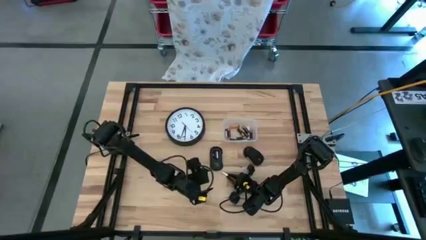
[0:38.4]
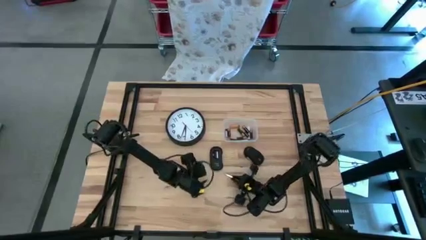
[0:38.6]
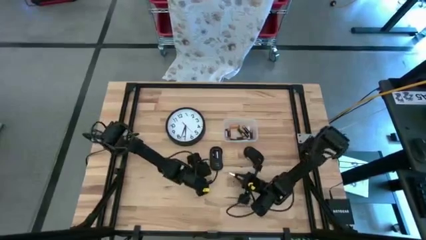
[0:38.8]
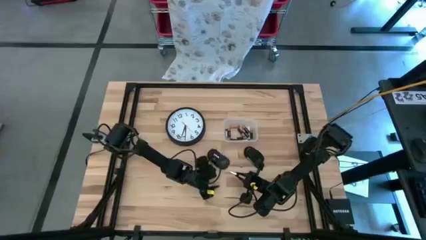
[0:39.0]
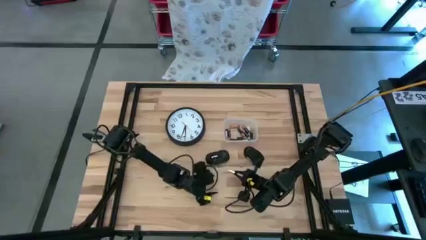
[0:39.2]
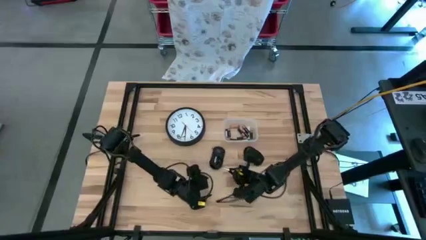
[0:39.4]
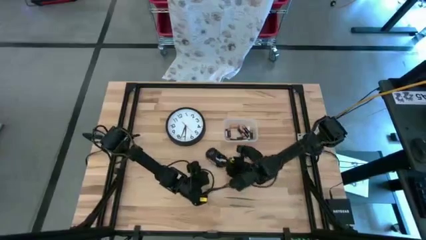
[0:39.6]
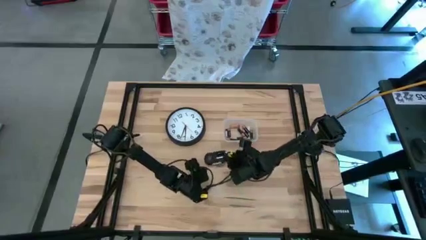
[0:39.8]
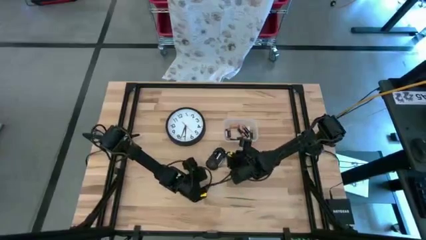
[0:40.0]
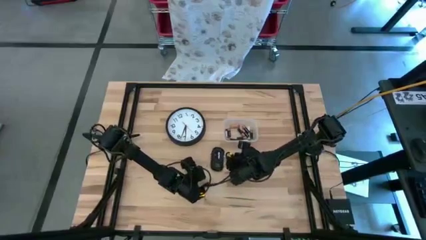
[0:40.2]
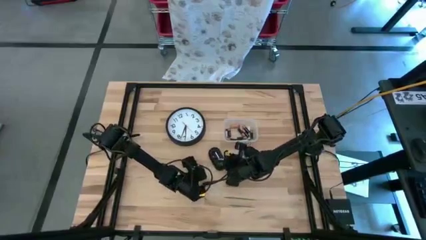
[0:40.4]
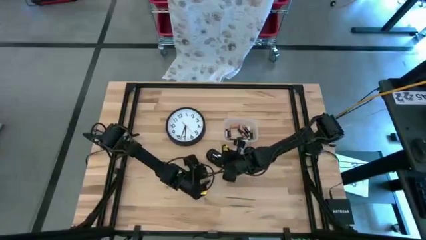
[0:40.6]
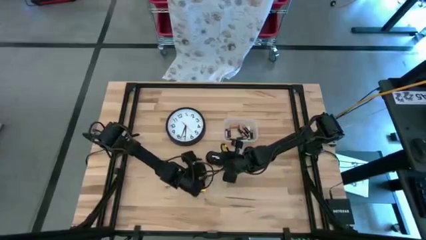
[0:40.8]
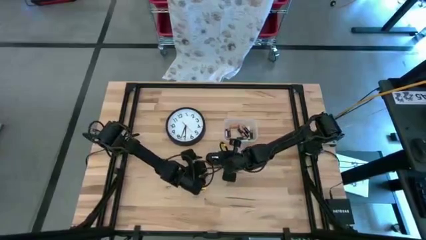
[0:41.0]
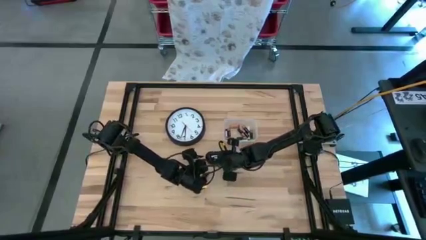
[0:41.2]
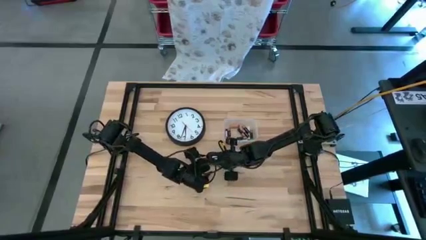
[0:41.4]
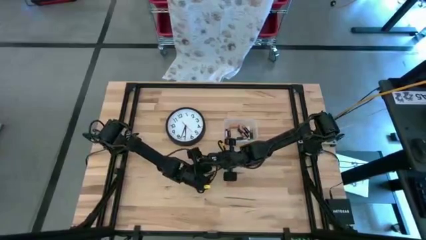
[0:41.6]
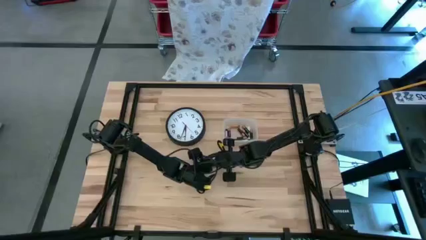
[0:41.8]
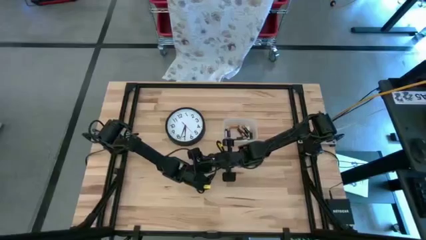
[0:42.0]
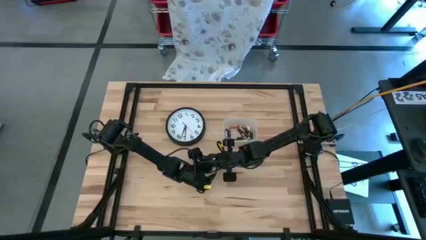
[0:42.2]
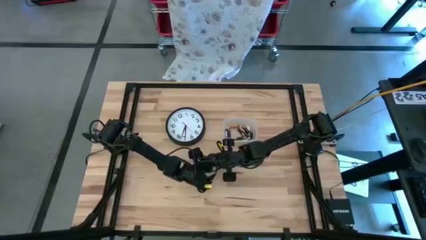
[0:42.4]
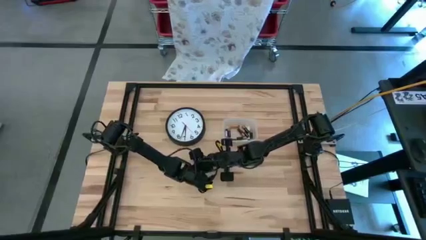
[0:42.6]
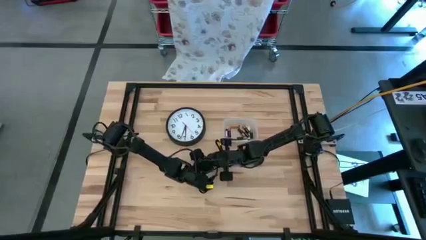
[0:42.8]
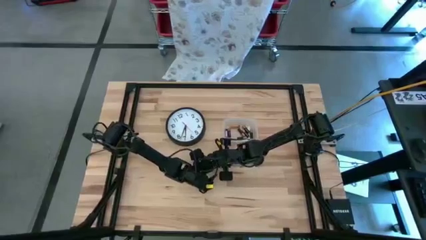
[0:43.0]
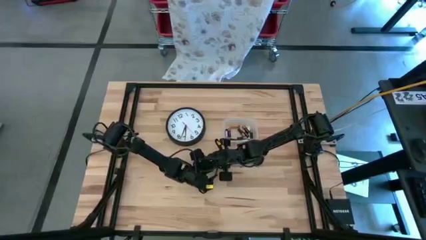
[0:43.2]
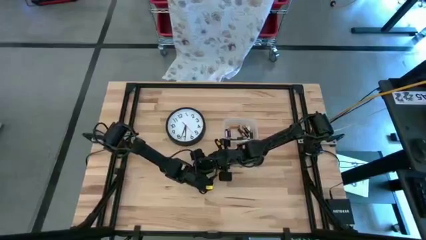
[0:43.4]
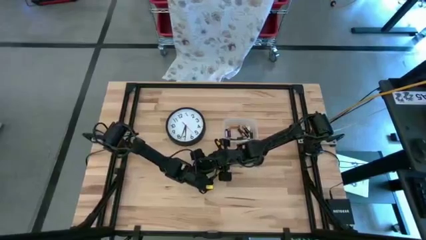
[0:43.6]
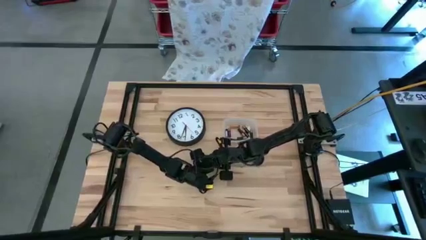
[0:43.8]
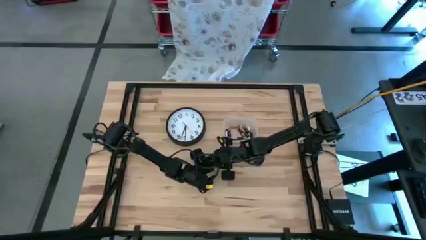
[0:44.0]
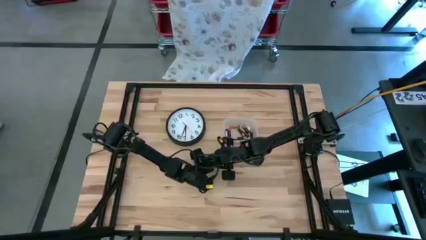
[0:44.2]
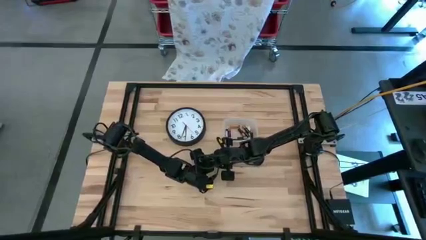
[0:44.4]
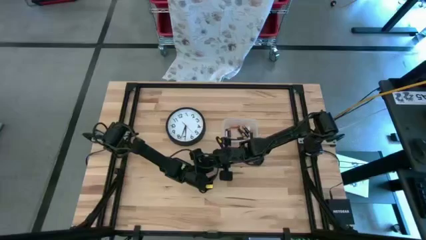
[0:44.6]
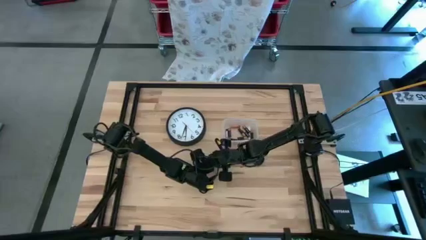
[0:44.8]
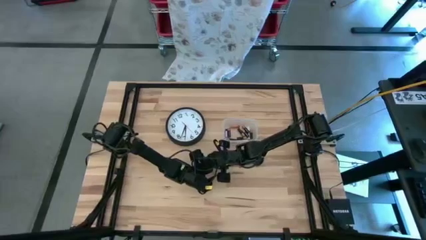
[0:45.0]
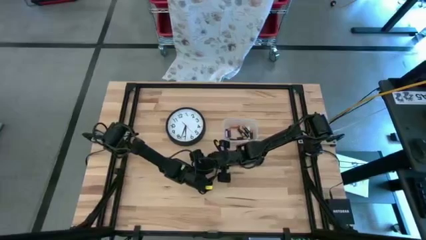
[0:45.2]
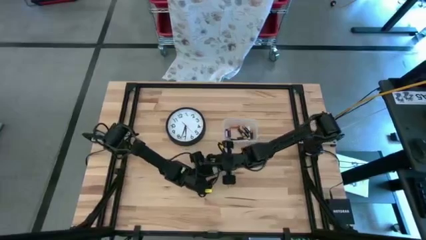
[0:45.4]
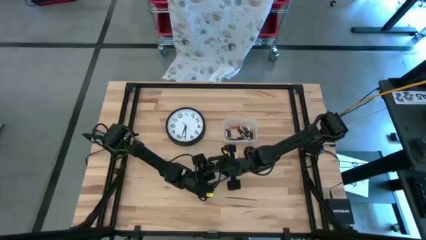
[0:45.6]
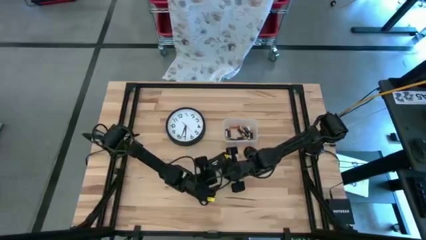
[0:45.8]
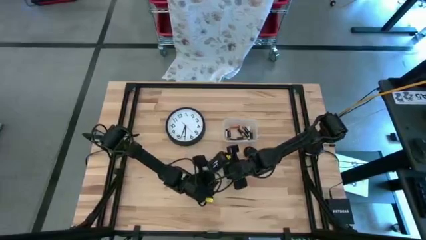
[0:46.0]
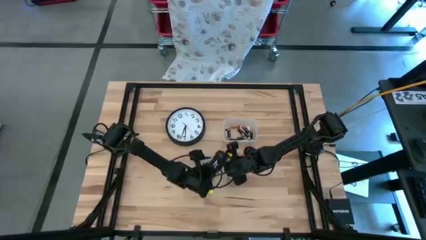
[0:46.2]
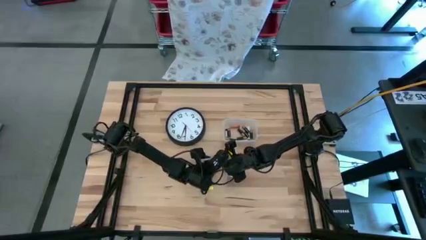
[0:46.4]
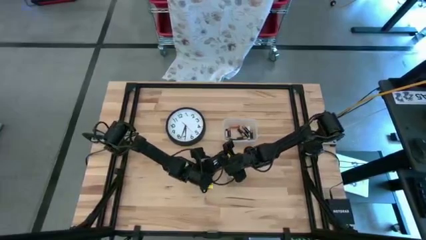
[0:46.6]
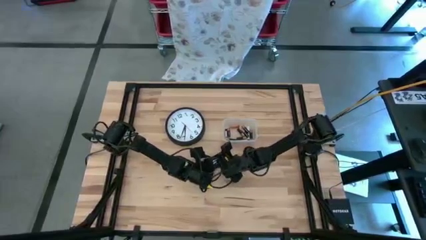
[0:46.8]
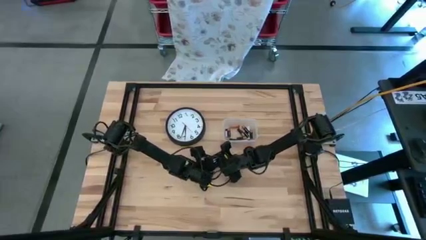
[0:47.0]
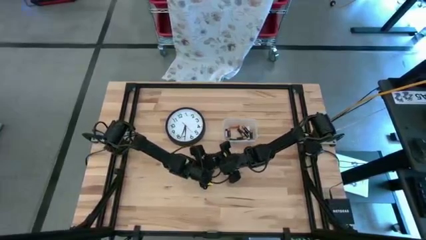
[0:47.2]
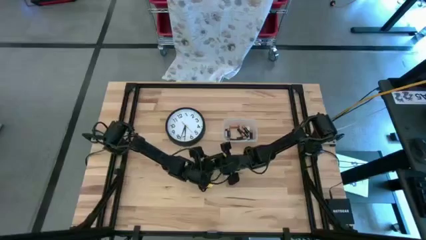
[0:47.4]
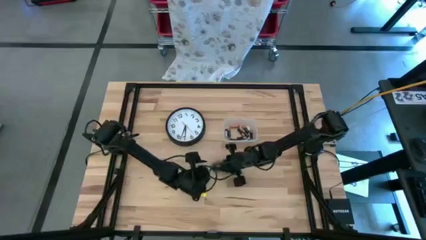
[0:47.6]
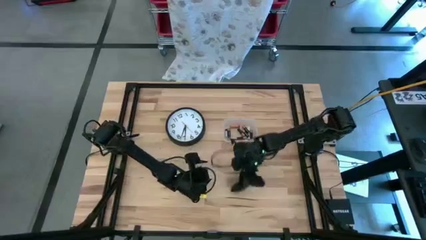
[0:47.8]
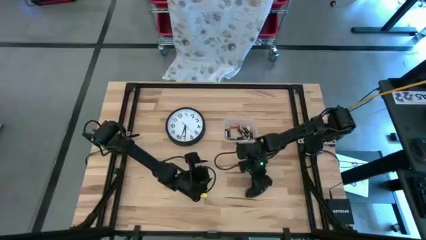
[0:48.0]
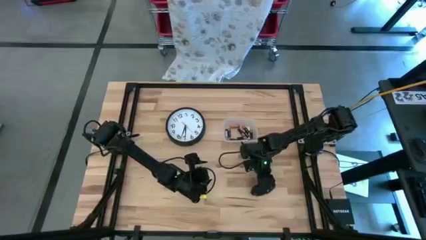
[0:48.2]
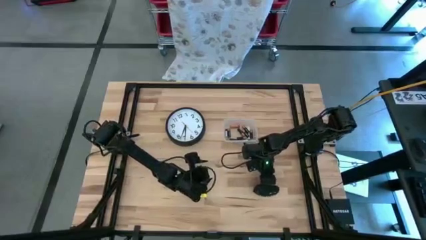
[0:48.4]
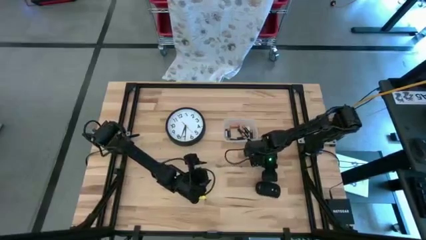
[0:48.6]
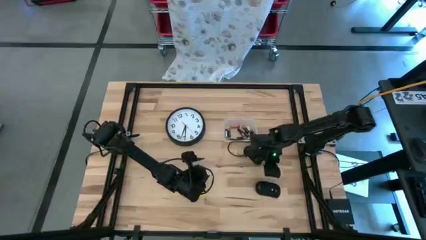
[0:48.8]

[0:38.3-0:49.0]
Task: Insert battery
Insert the silver battery into the left computer mouse

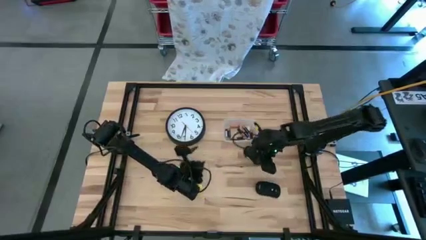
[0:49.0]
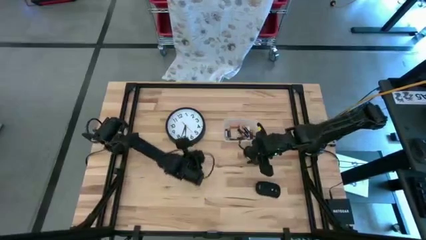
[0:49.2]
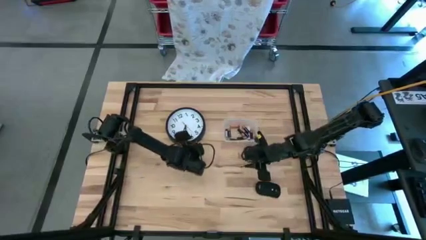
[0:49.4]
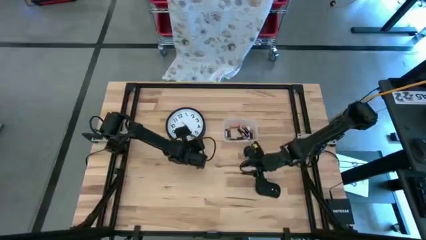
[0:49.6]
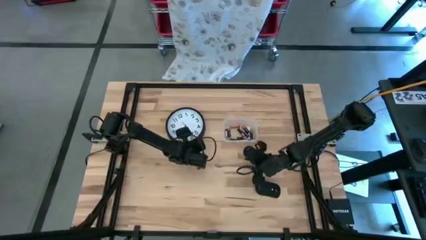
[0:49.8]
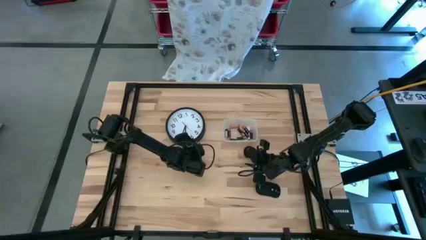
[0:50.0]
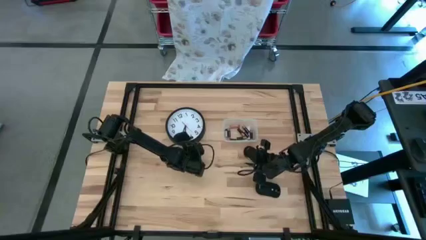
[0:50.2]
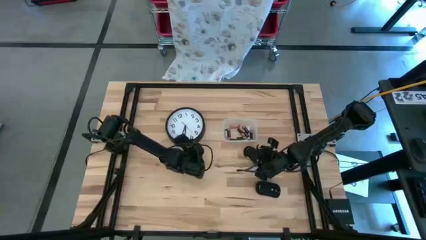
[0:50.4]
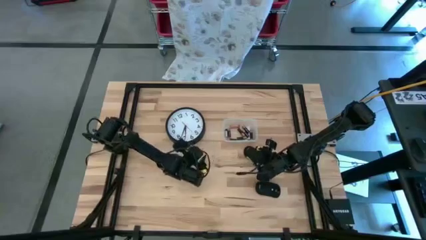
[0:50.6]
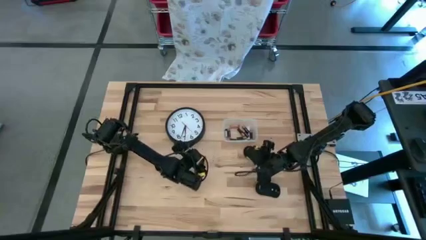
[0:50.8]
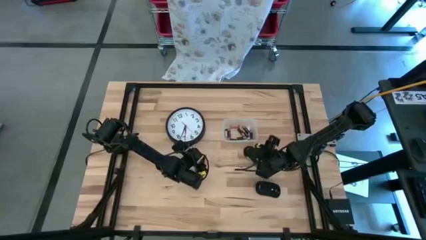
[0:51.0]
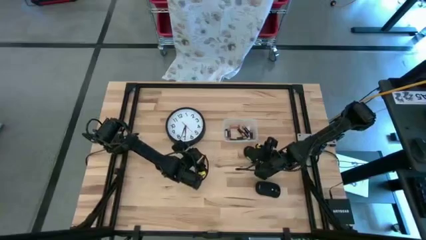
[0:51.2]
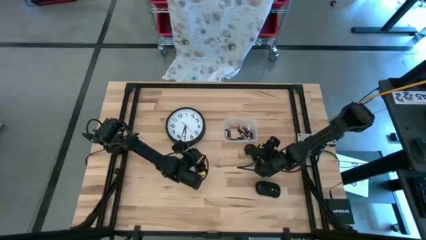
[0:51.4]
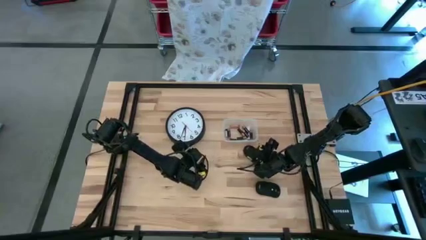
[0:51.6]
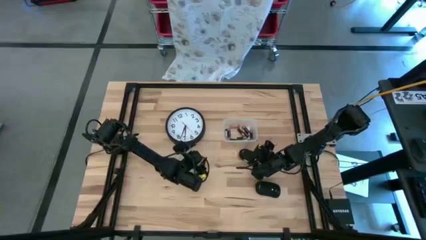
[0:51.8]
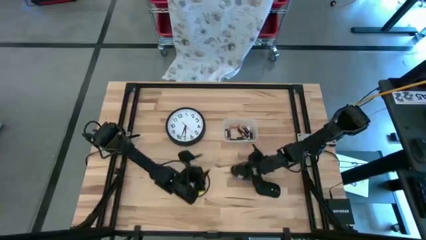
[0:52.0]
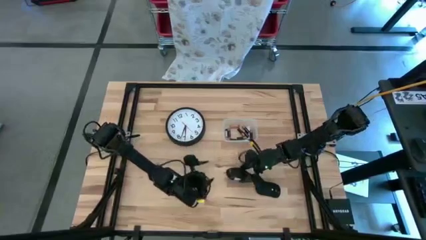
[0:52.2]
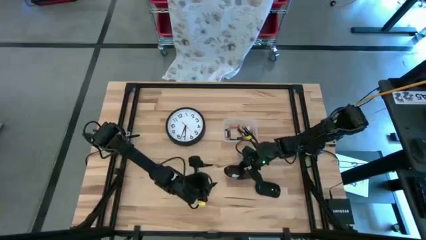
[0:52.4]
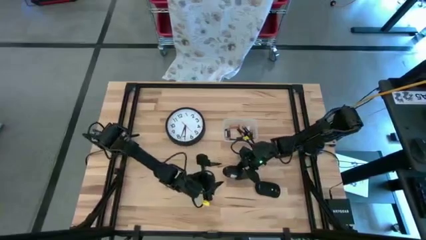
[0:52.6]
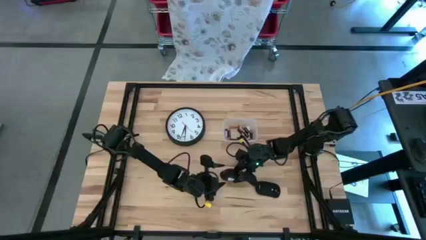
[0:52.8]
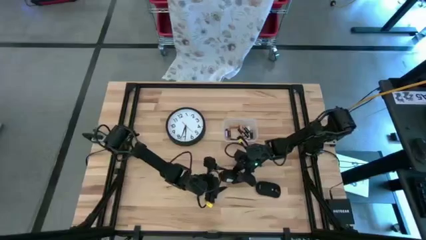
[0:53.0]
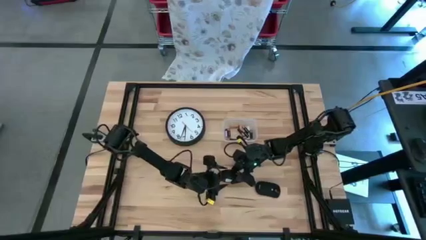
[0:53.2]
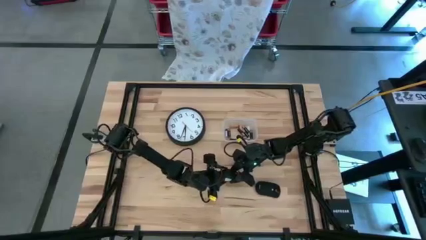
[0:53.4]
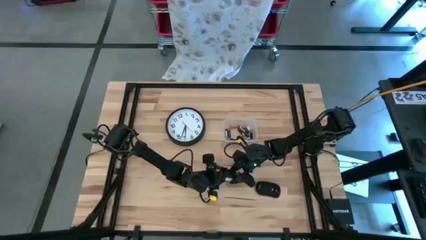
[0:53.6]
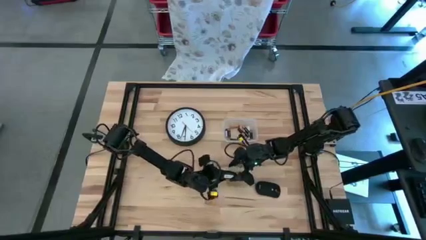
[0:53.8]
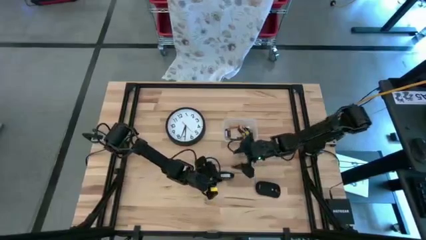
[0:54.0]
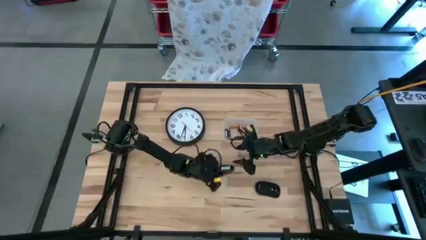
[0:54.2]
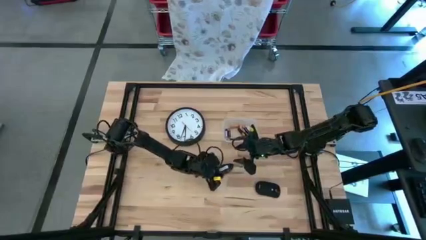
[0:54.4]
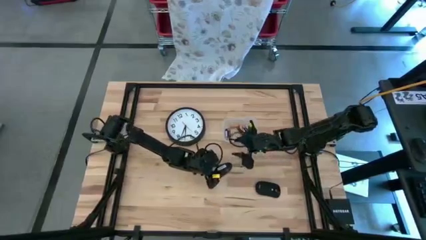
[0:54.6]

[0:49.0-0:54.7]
Prepare the right computer mouse for the battery insertion
